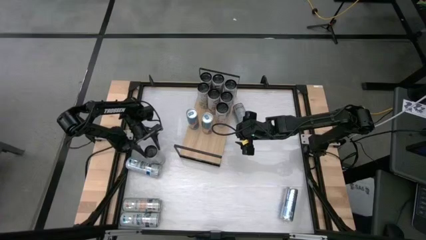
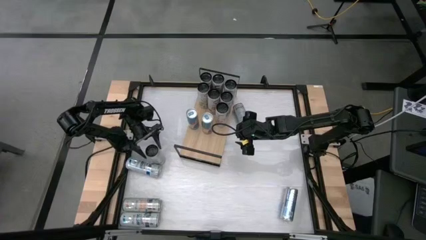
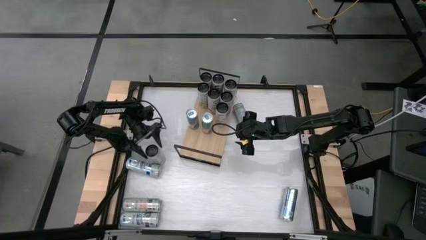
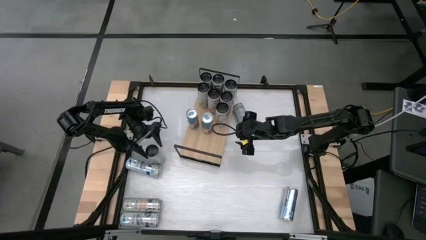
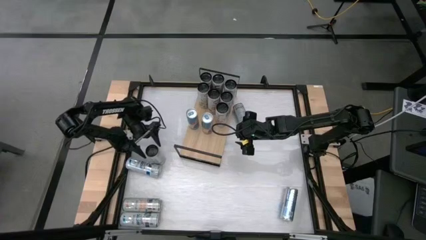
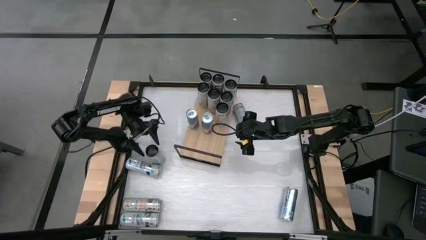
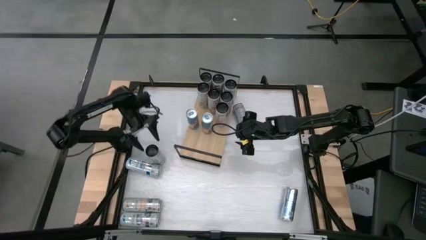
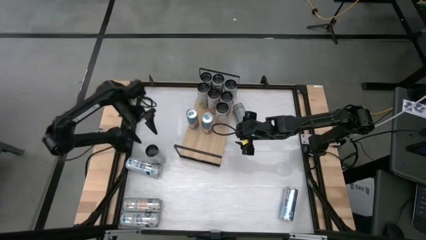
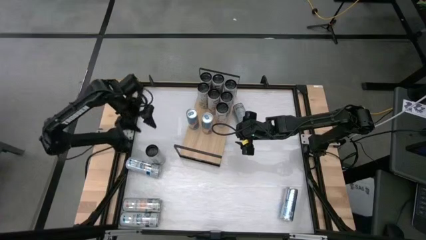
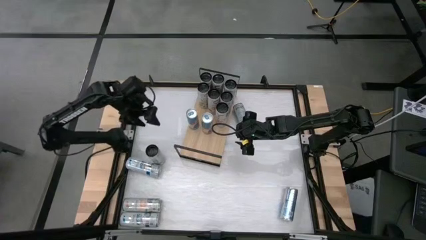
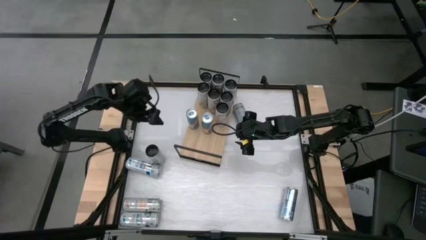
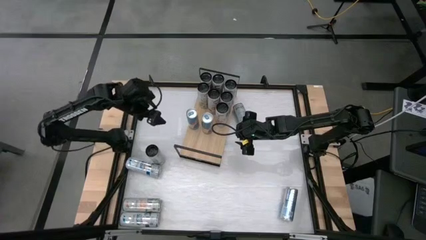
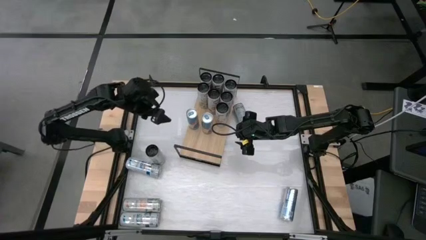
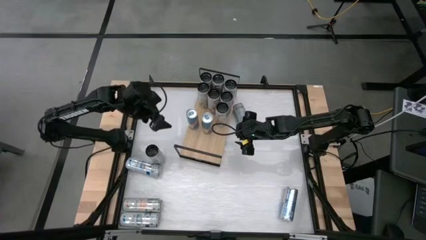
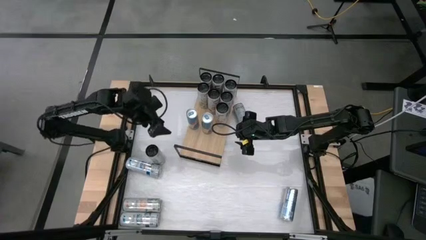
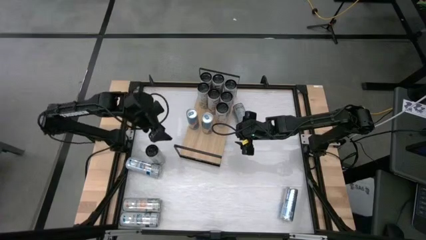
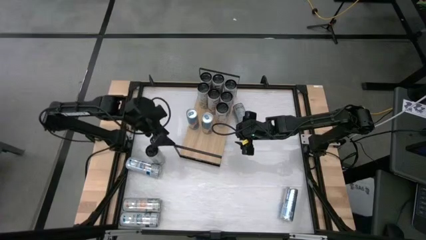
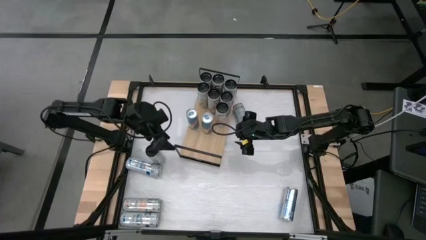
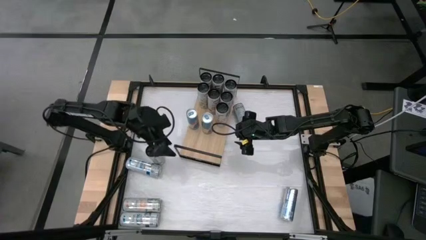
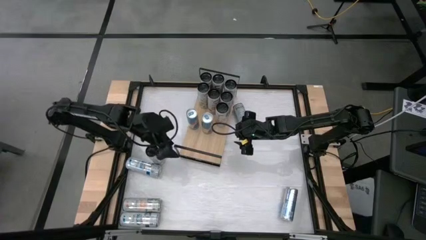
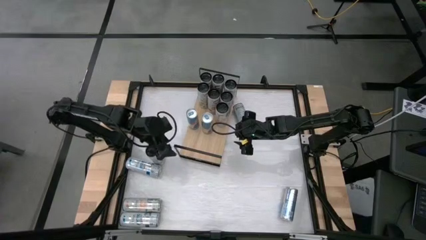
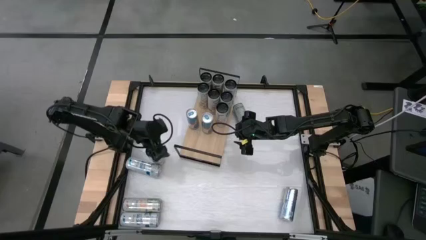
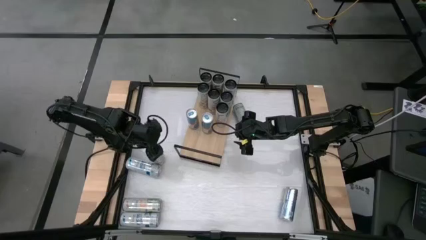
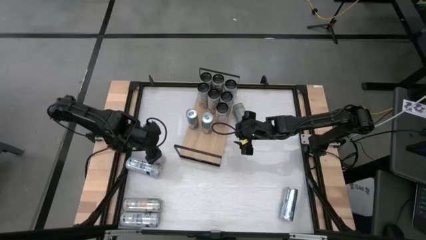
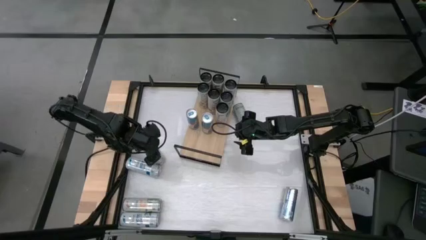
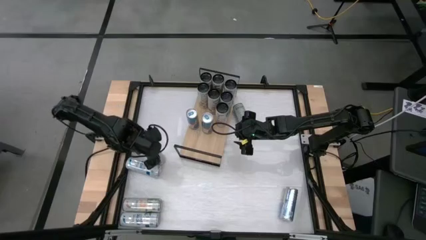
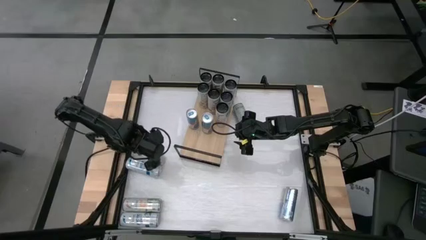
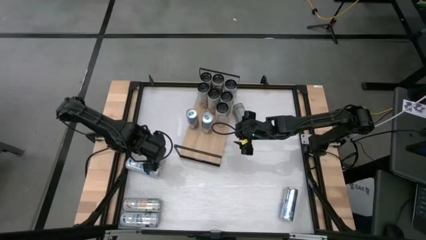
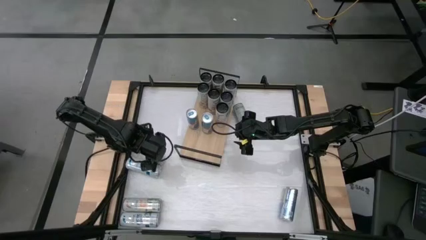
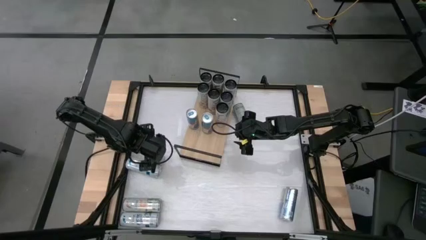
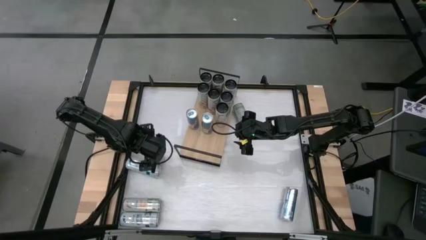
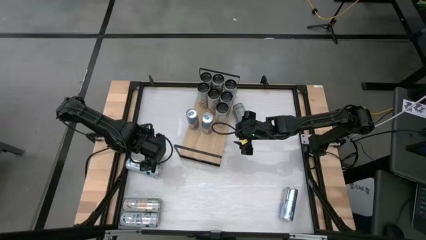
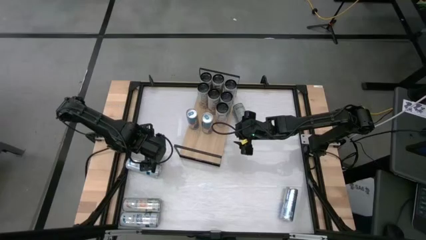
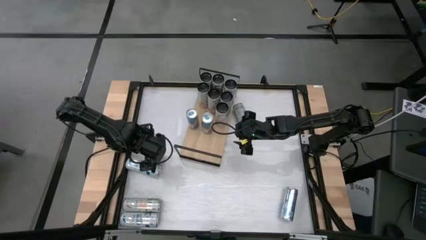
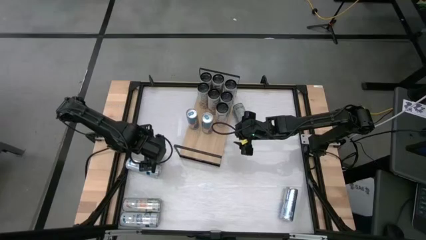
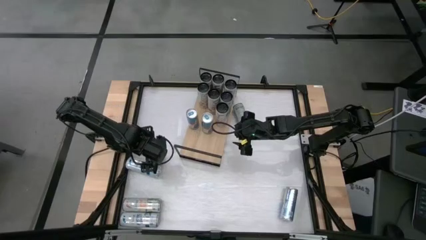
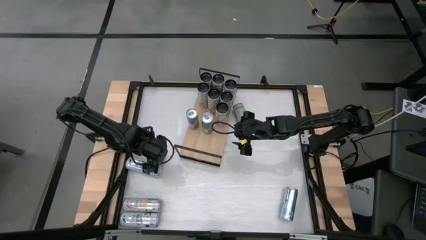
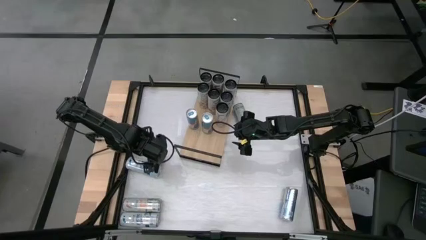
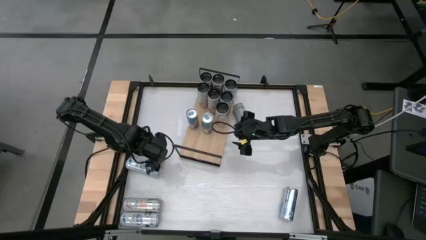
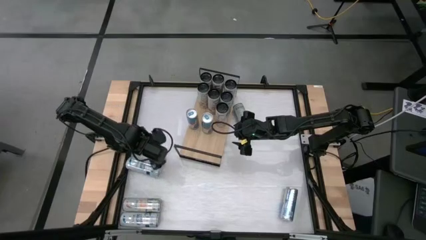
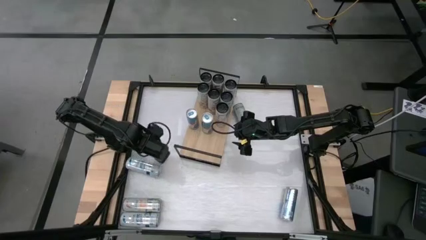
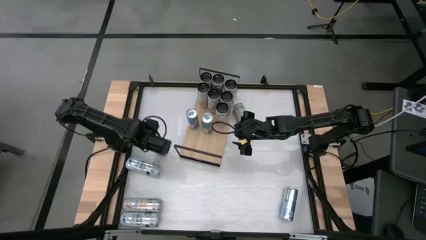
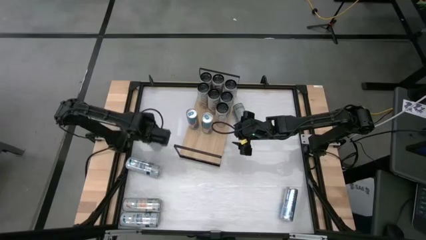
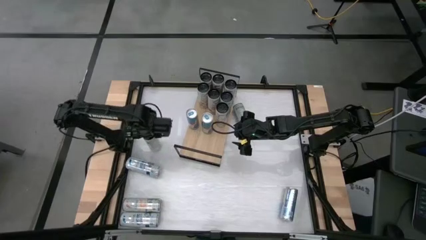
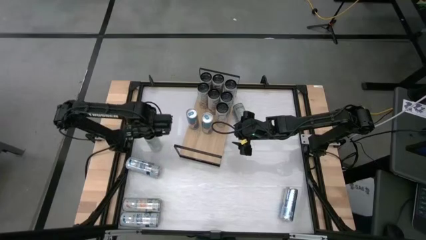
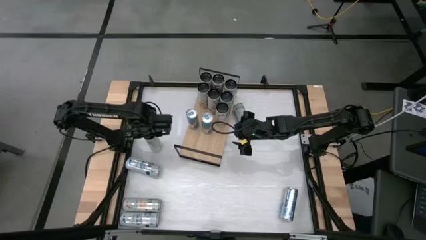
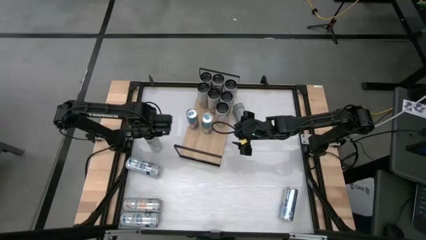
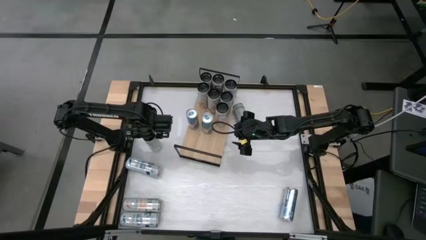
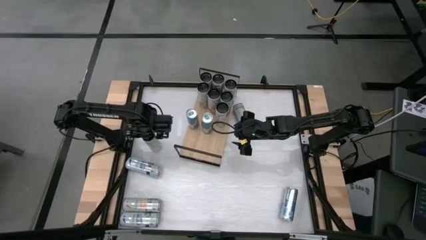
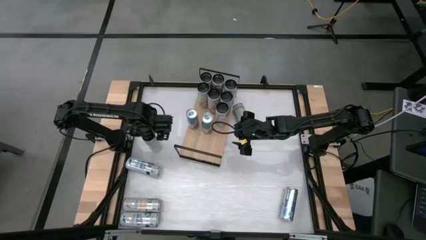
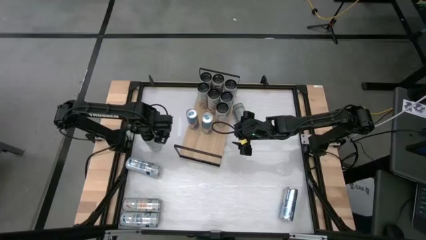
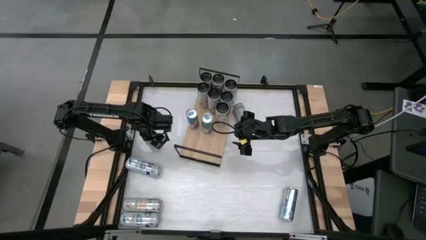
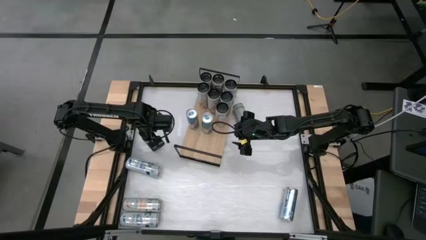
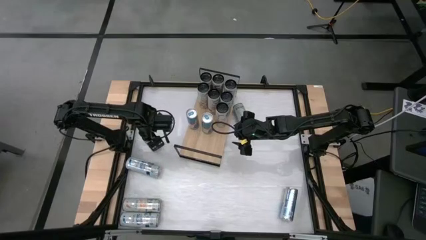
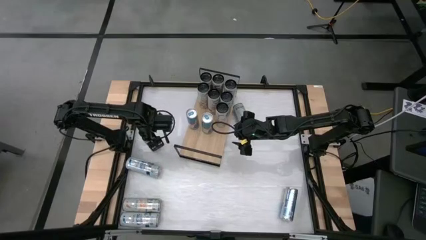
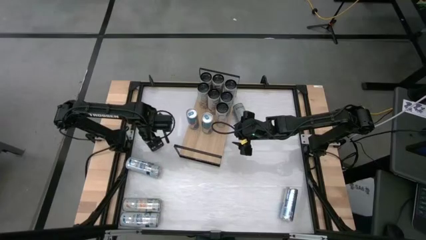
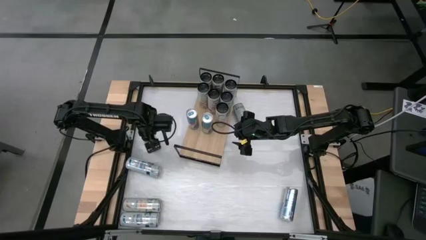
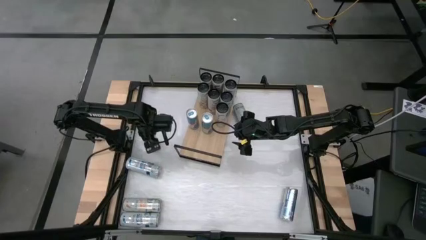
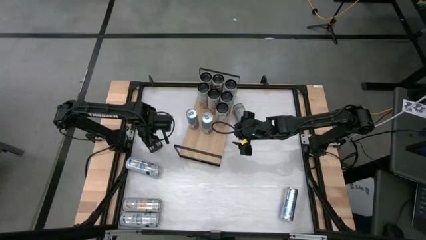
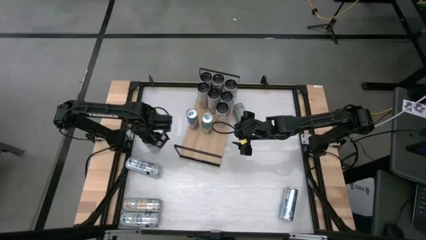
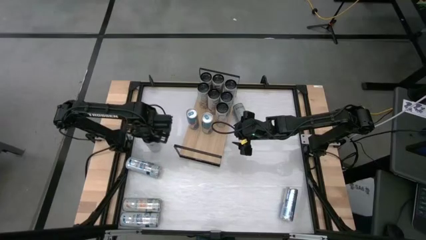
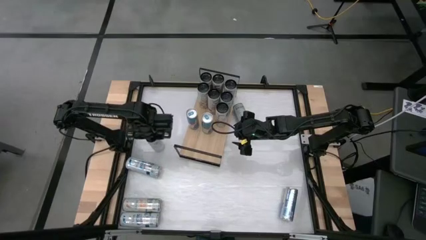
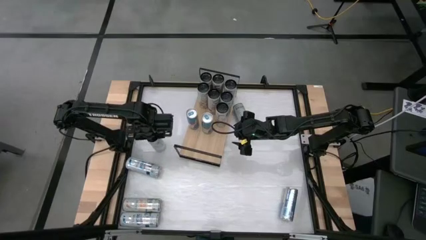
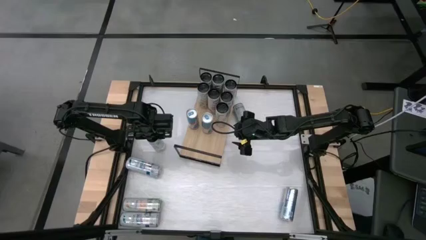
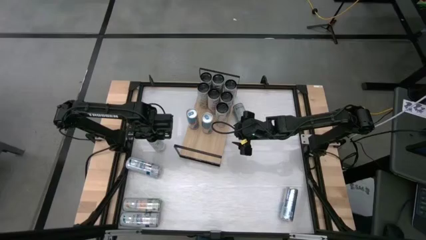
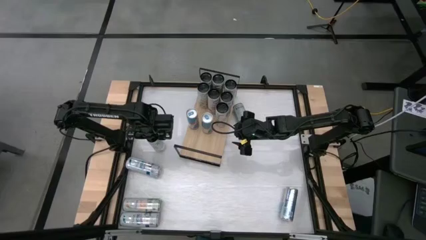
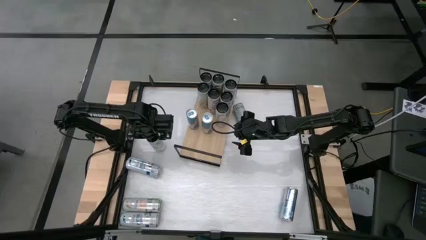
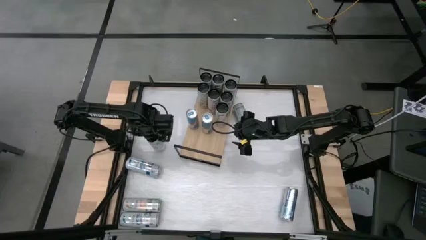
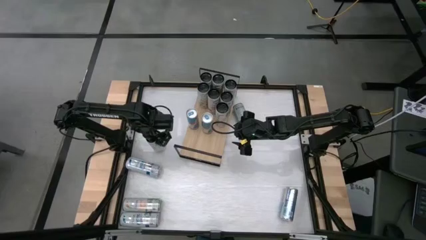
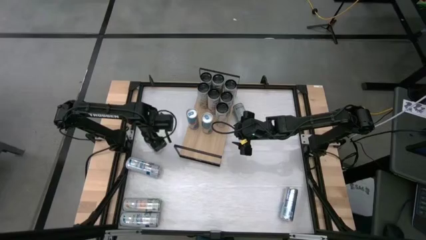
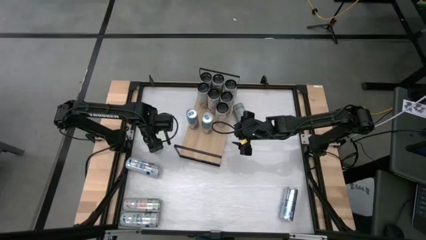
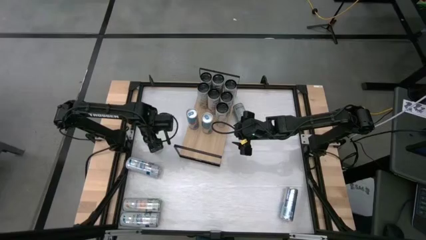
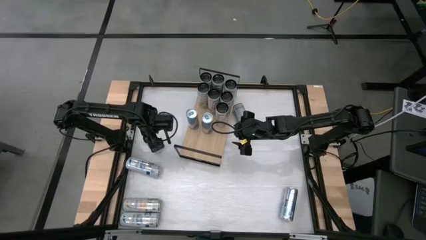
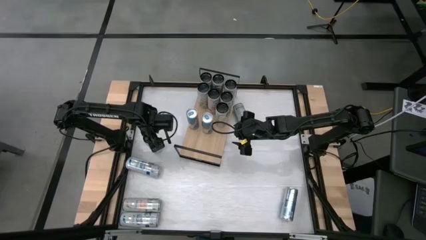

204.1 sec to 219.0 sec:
Task: Place canned beverage on shelf
Put the bottom left pink soda can on the shelf aligned with the other pink soda can
